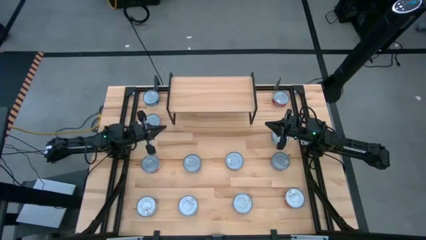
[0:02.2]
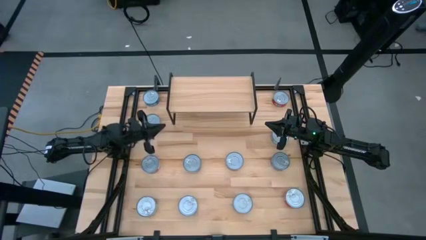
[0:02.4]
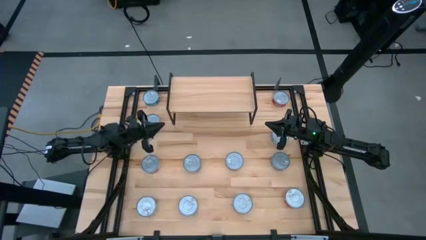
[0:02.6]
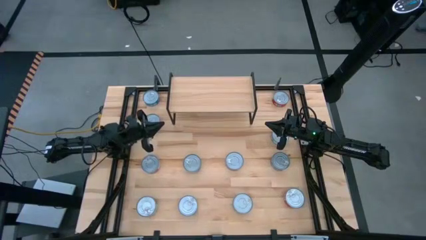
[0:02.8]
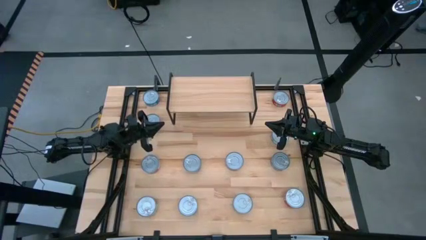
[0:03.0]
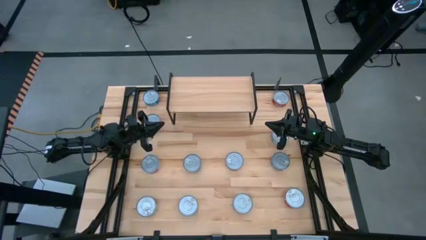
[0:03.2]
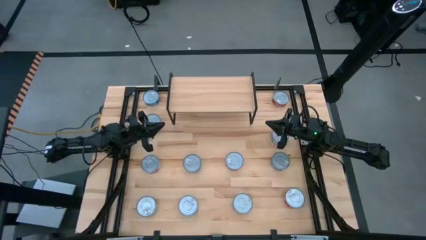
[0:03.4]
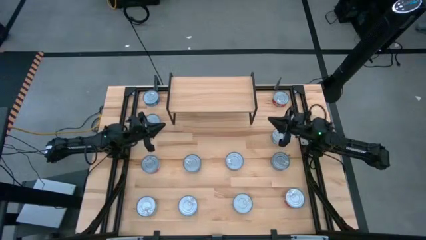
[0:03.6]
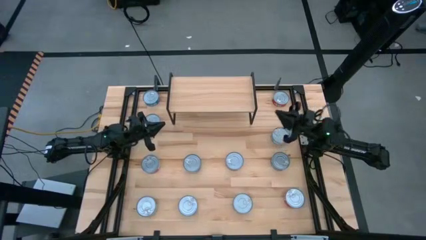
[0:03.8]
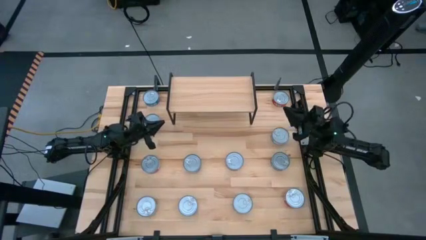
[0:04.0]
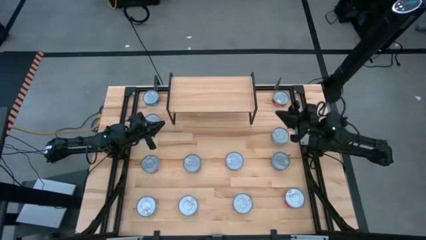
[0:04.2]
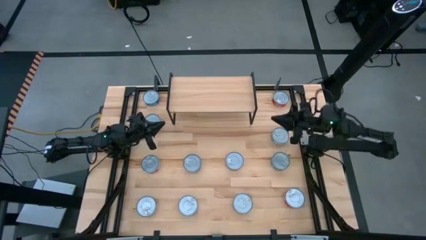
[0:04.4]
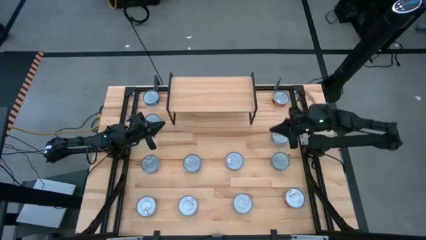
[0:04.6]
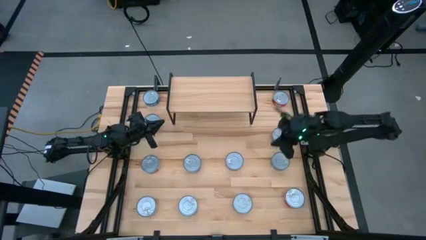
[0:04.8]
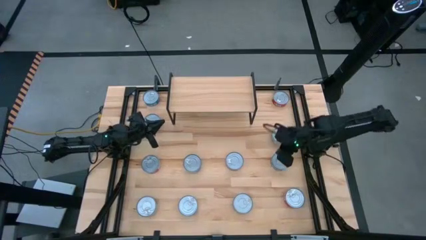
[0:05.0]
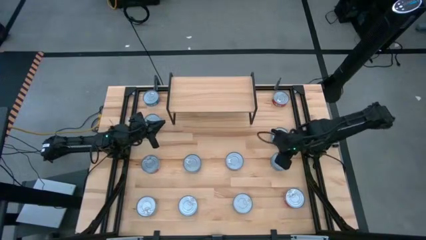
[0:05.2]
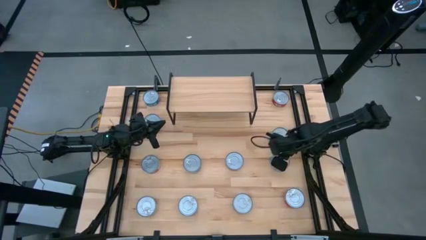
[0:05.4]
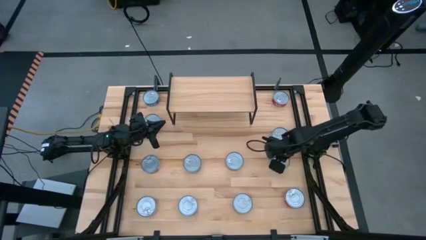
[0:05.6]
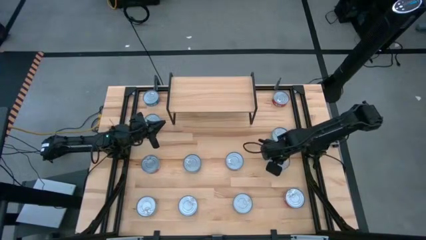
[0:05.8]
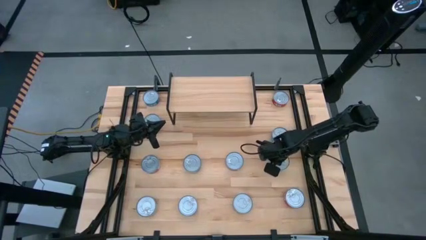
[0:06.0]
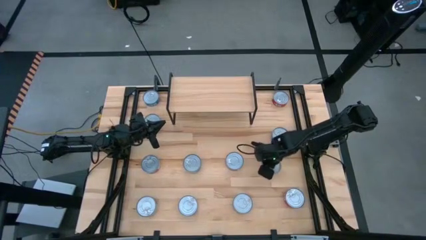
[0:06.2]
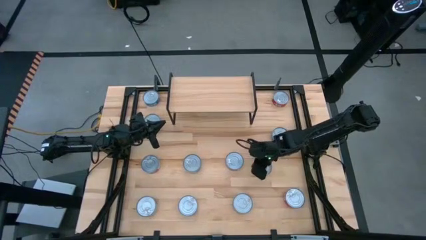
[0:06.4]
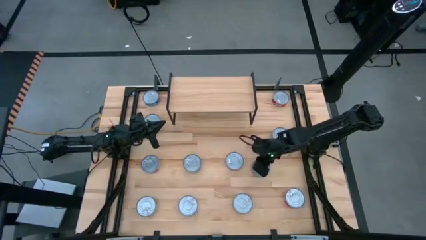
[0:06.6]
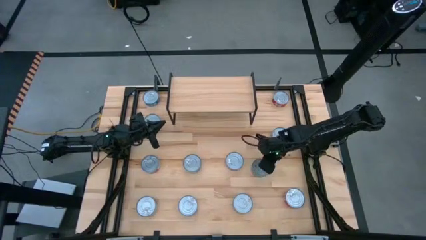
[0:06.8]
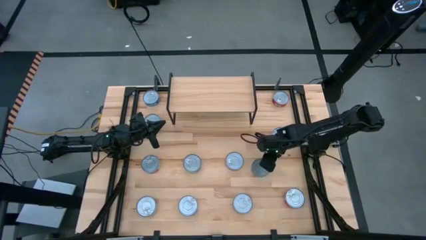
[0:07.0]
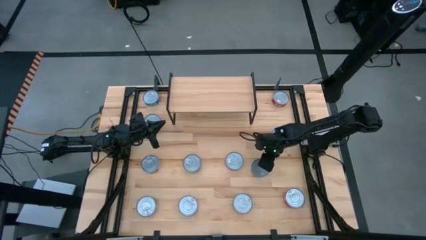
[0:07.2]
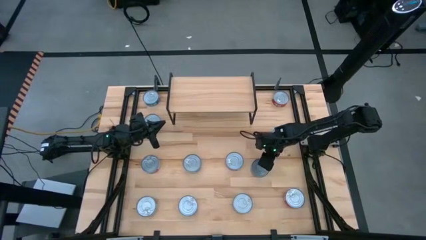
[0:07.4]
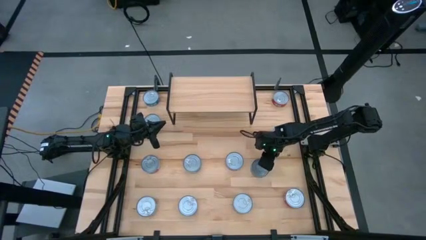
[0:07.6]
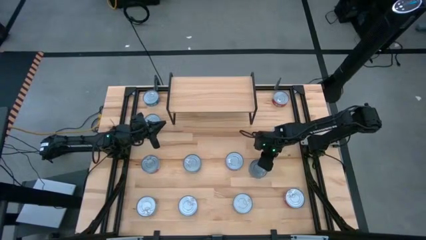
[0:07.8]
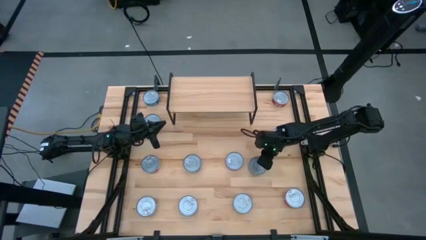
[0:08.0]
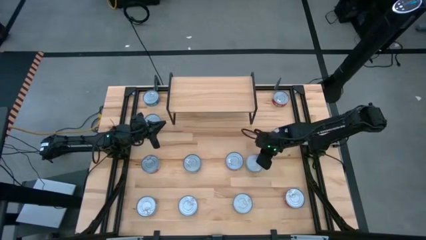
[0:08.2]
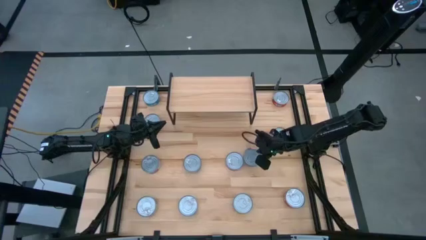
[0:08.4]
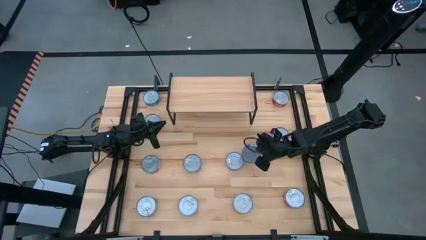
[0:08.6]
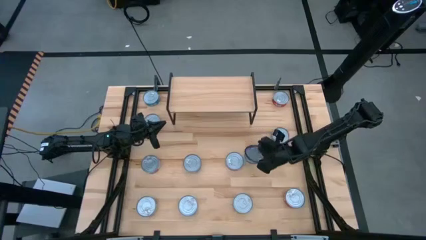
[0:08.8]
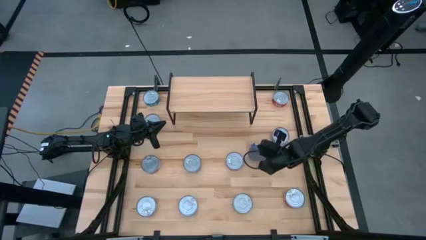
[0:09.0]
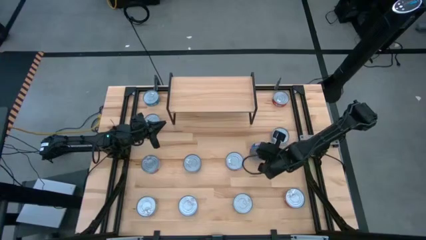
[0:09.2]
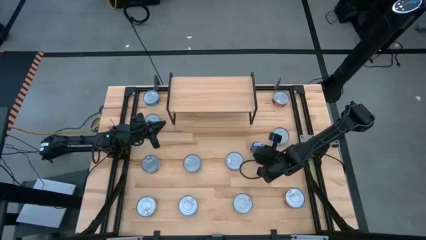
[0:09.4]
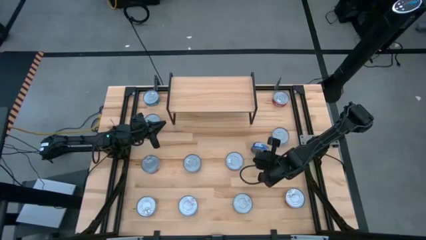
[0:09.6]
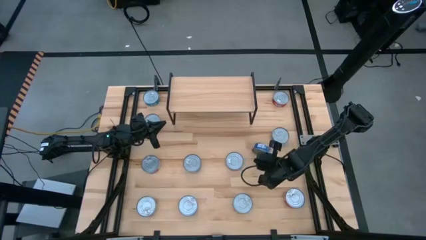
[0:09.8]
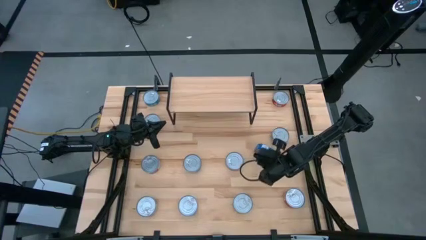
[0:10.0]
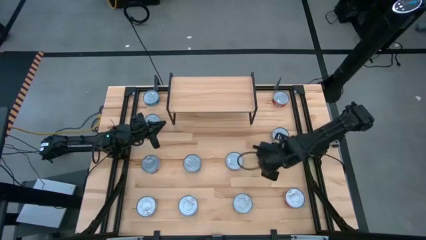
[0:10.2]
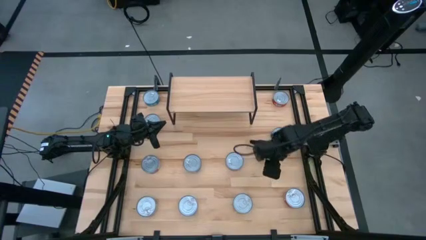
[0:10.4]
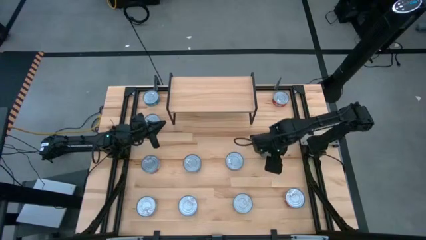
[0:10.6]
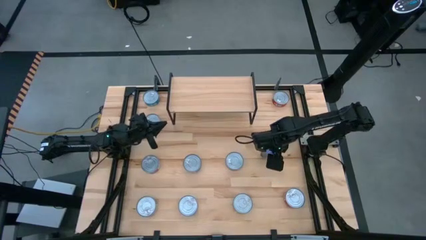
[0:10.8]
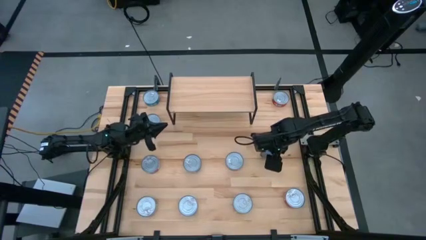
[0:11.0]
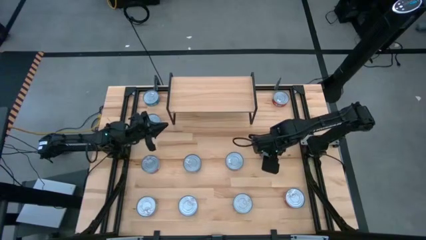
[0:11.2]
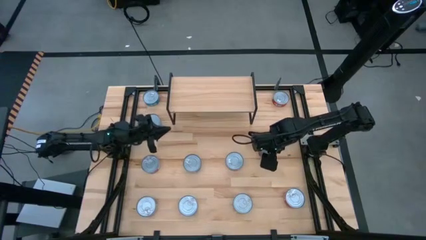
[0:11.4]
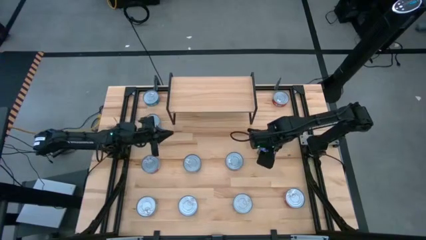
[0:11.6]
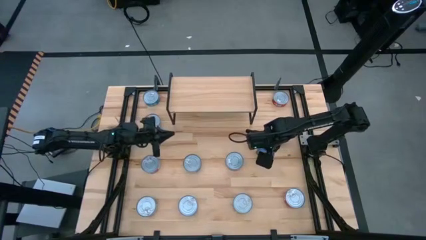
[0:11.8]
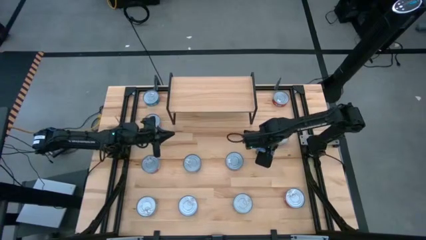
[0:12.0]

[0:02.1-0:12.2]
Task: Stack canned seafood by type on shelf
Put the middle right blue tuna can on the shelf

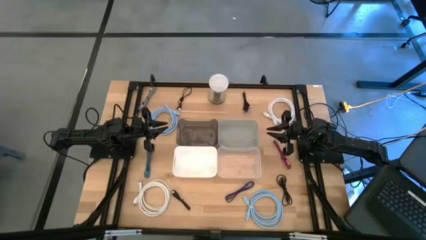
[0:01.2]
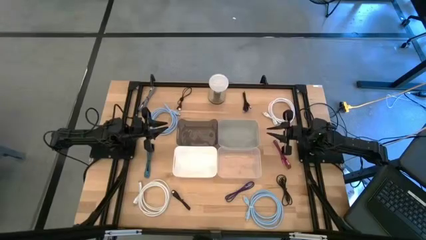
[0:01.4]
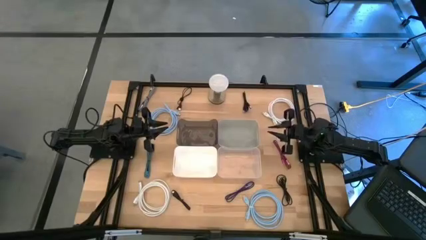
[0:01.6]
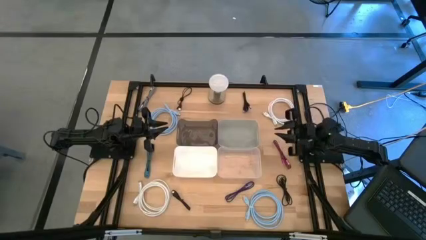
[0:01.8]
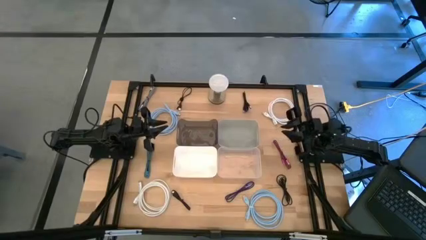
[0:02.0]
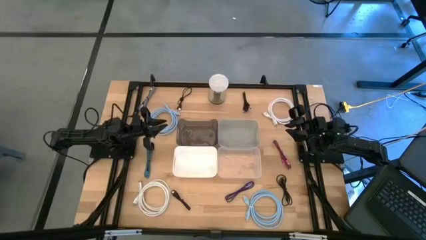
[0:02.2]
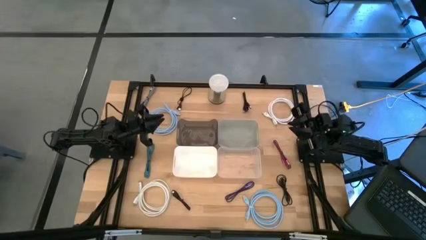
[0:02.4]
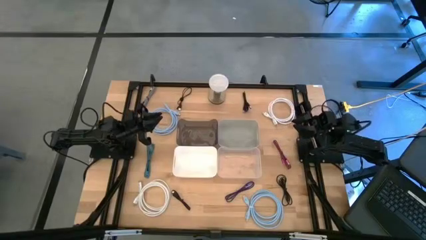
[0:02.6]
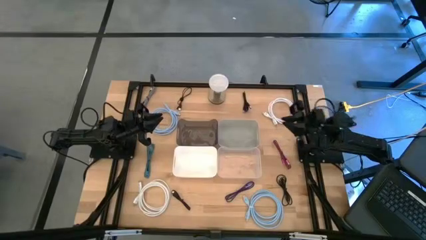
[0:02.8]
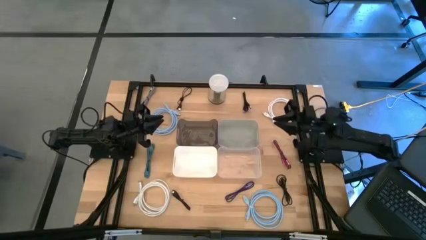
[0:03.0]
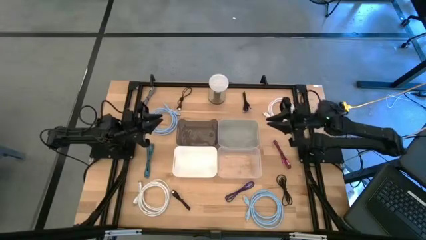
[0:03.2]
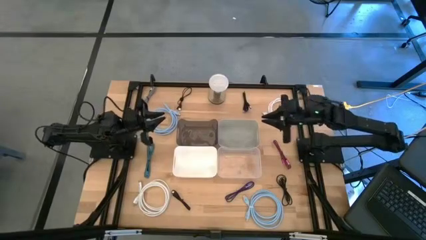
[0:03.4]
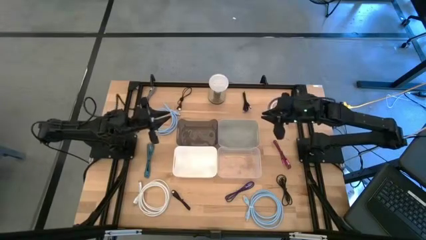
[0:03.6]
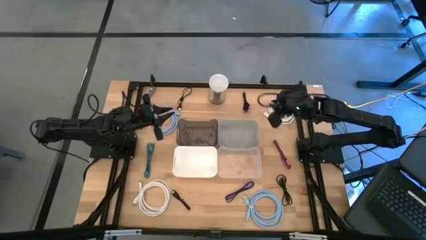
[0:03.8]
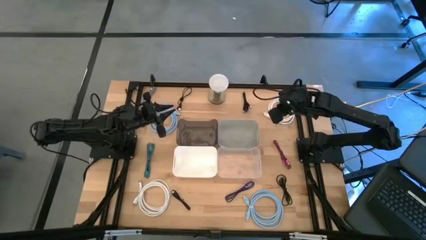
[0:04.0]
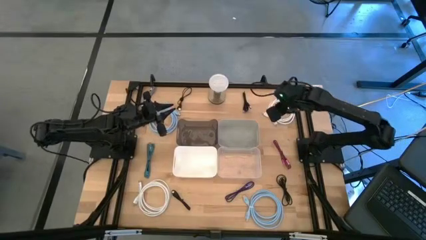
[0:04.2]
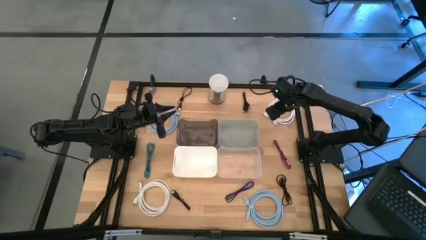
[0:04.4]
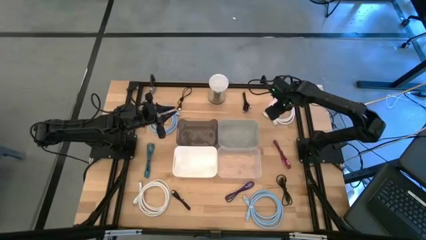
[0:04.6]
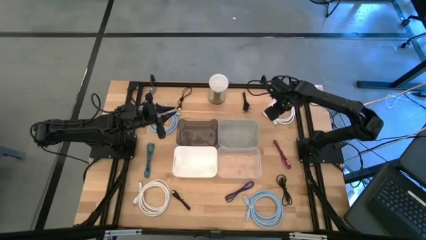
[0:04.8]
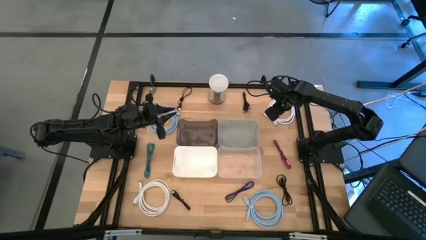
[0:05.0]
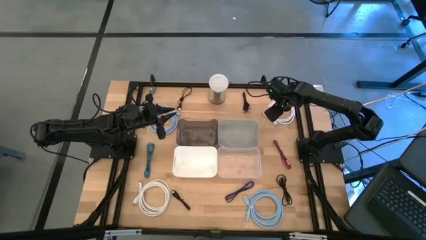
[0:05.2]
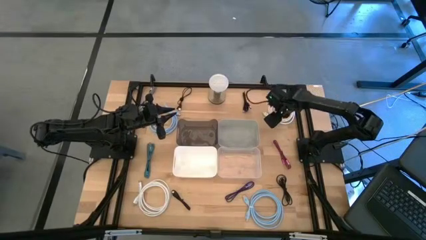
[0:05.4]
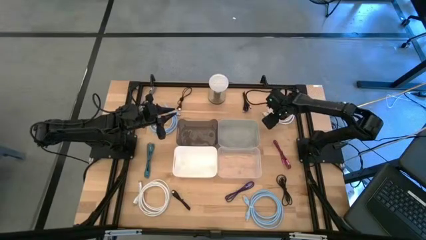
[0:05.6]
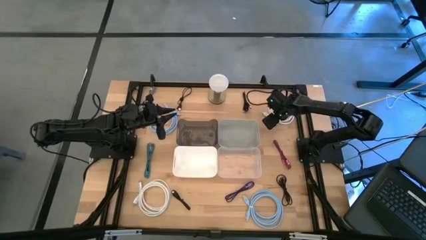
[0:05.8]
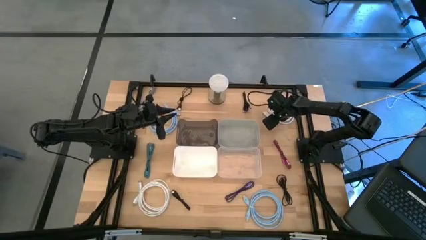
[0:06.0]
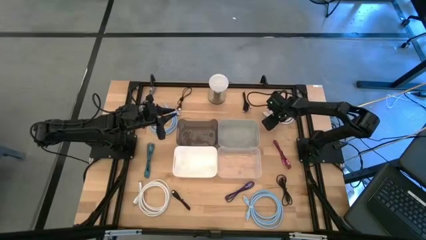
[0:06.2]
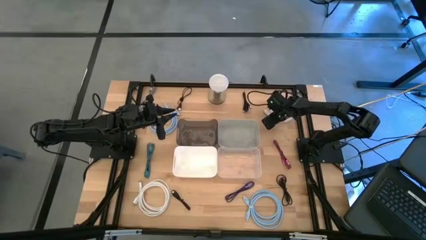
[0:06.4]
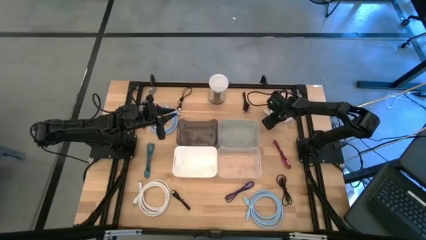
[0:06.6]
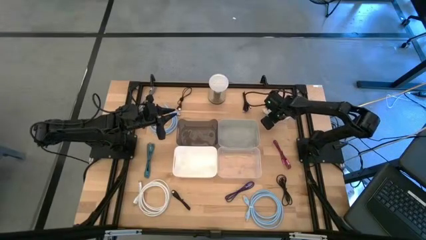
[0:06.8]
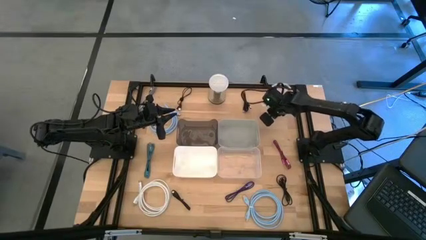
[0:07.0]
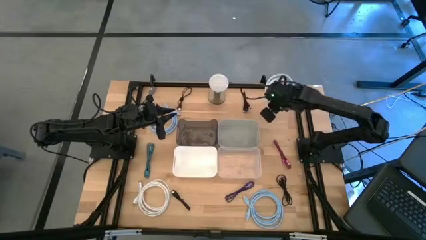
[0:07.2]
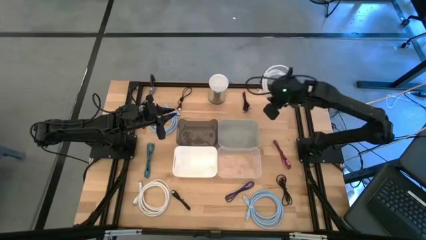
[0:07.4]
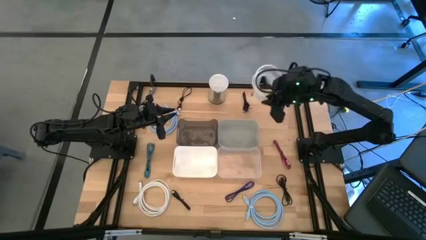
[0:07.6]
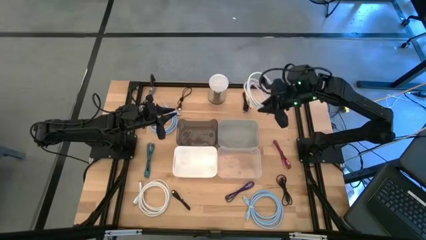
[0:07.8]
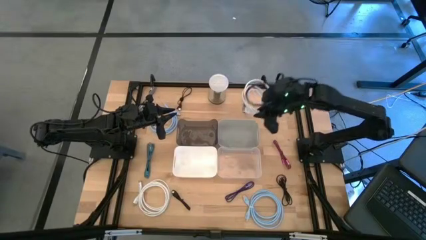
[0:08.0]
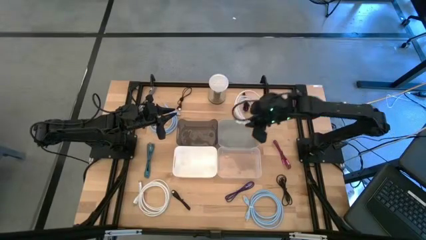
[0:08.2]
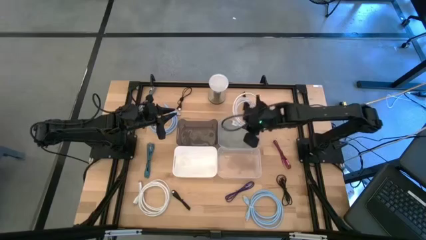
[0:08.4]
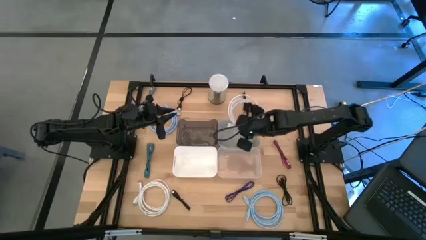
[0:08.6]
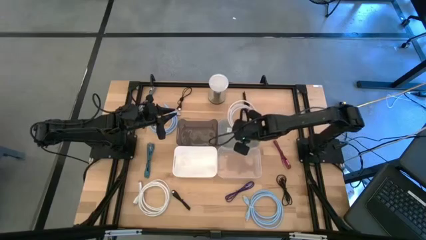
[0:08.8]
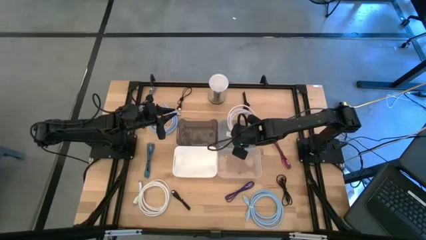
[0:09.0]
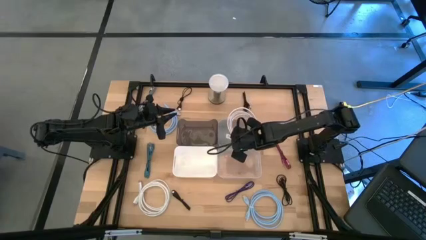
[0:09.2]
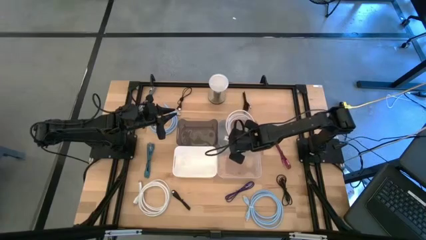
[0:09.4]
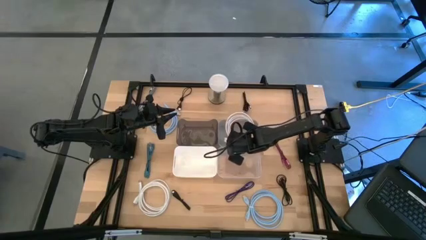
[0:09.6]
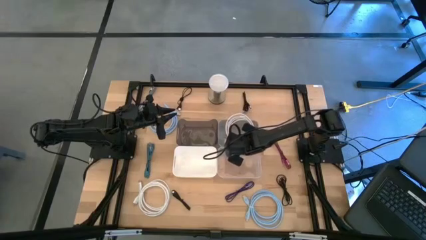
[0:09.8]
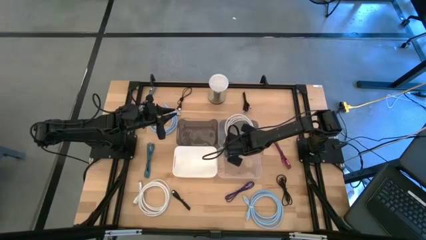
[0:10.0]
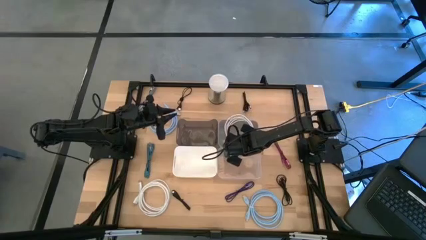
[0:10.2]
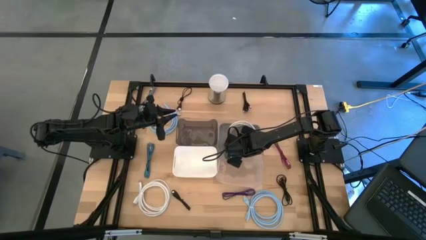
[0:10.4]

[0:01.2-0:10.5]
Task: Pick & Place USB Port
Put the top white usb cable into the gray bin
